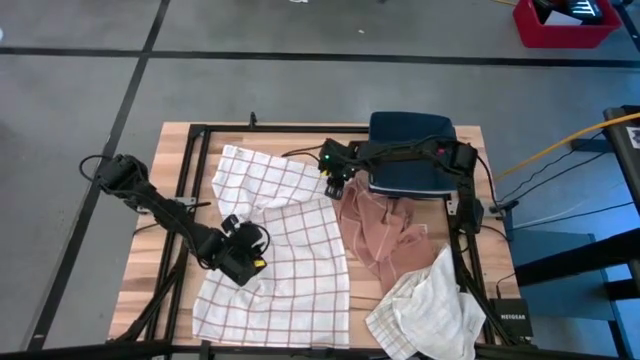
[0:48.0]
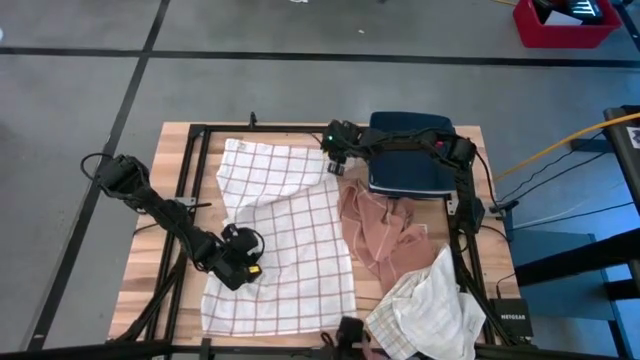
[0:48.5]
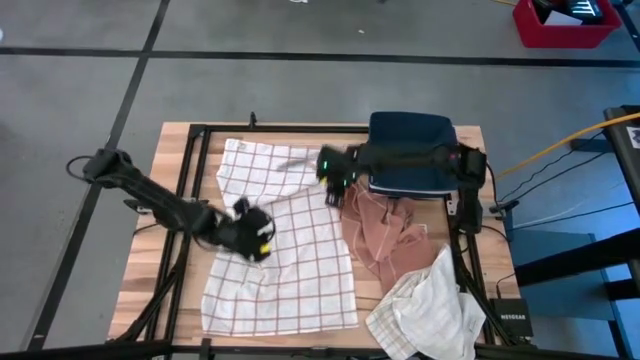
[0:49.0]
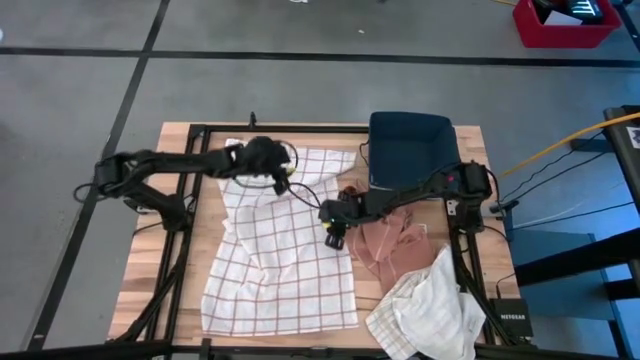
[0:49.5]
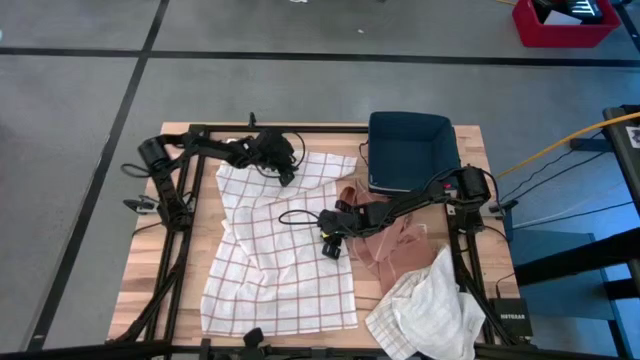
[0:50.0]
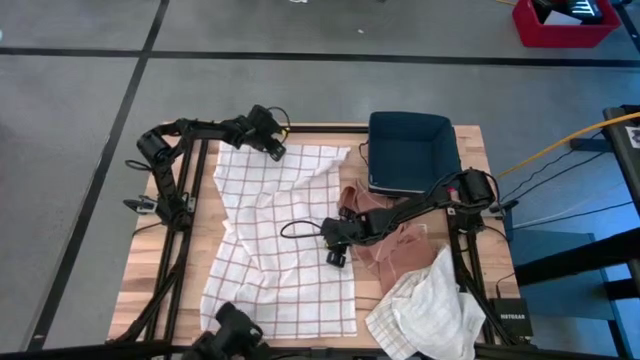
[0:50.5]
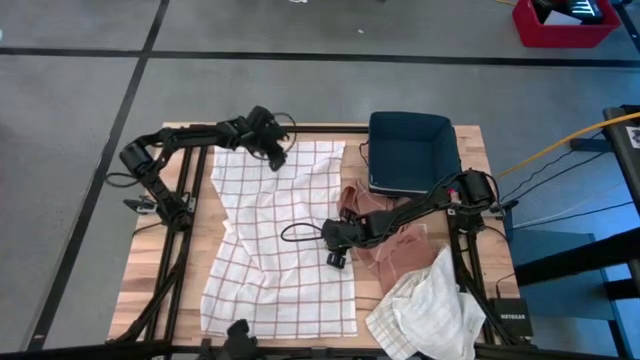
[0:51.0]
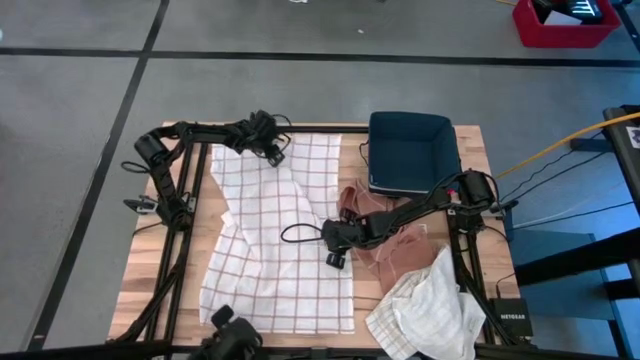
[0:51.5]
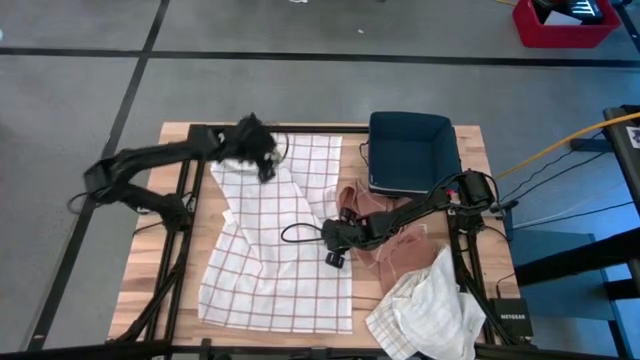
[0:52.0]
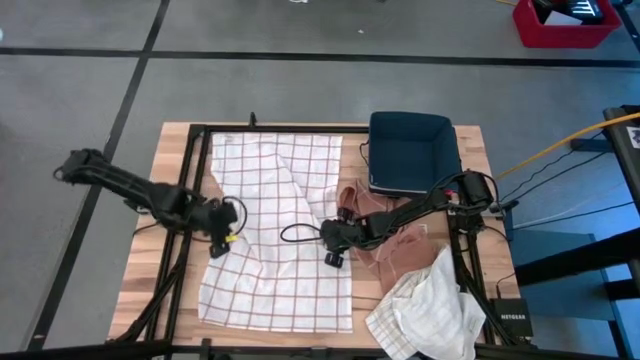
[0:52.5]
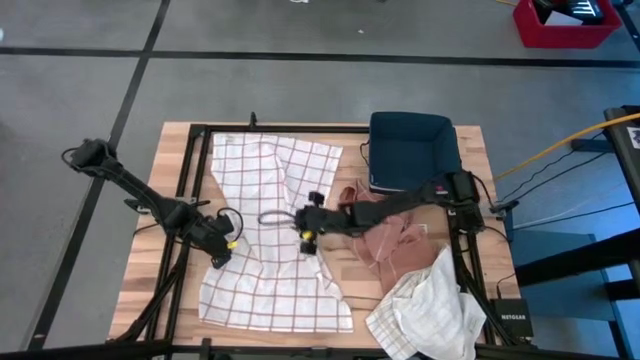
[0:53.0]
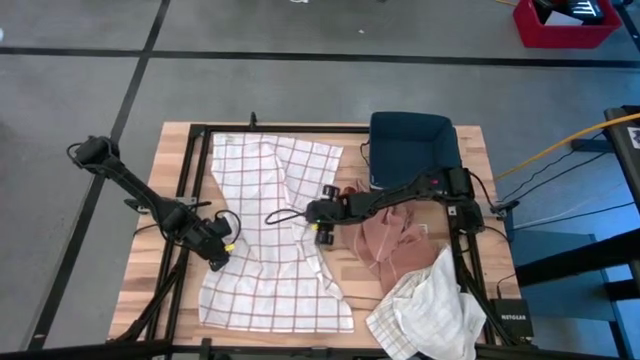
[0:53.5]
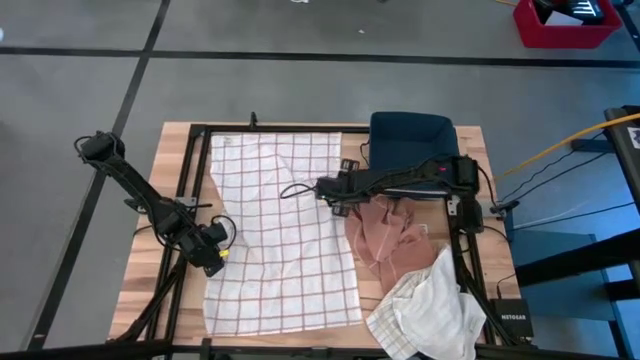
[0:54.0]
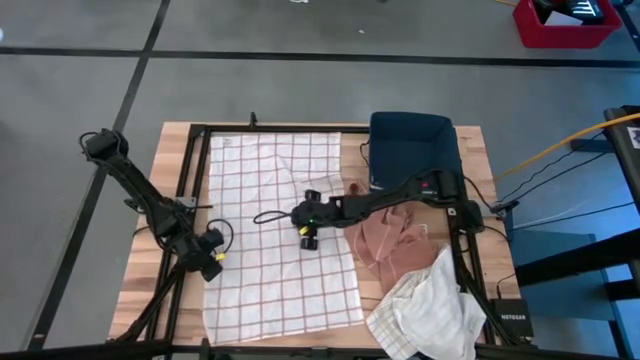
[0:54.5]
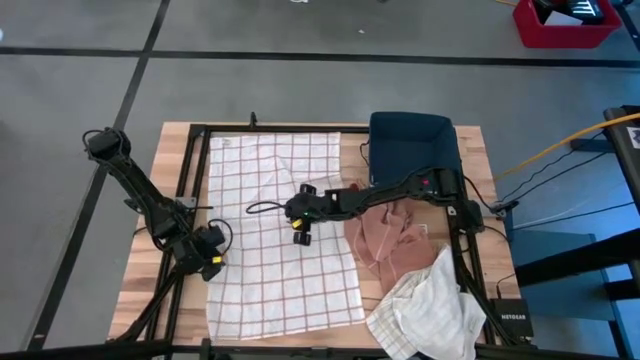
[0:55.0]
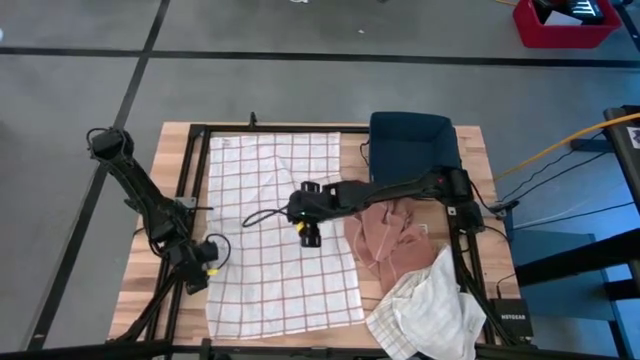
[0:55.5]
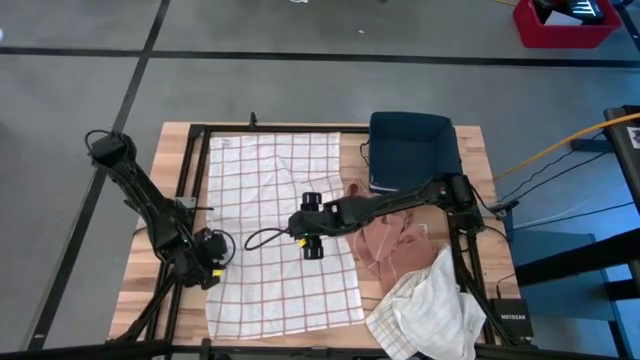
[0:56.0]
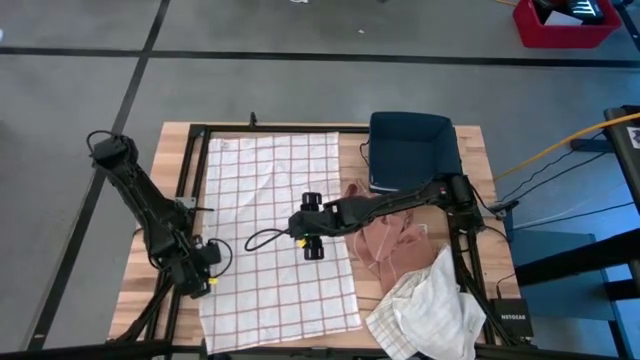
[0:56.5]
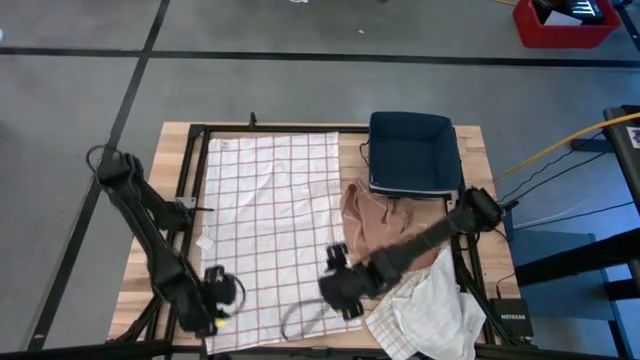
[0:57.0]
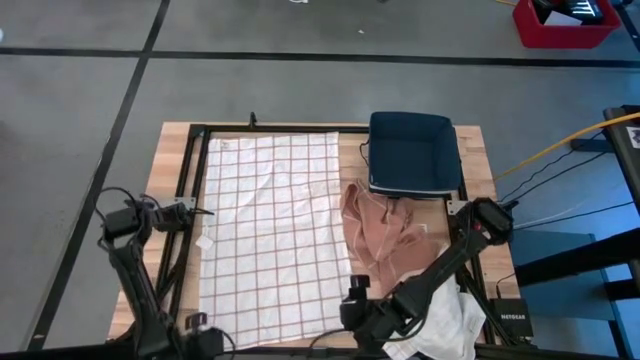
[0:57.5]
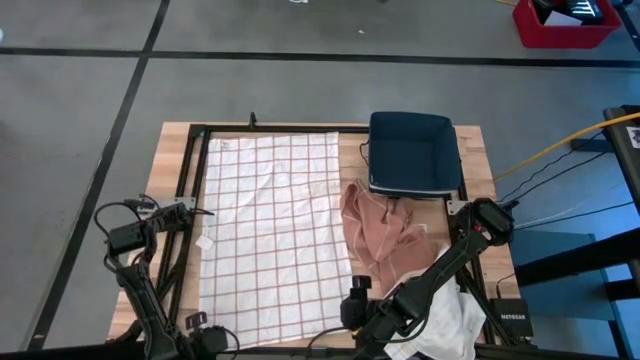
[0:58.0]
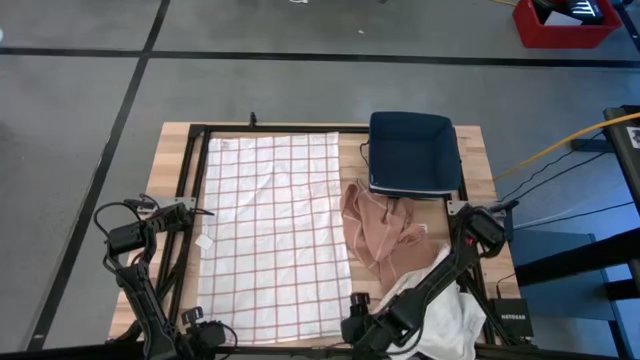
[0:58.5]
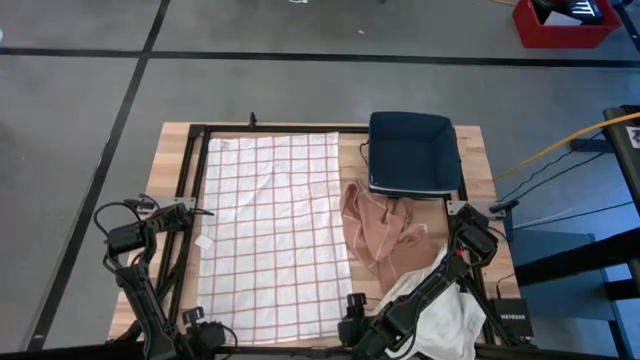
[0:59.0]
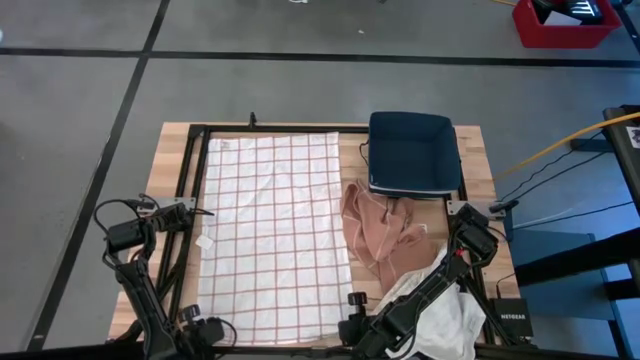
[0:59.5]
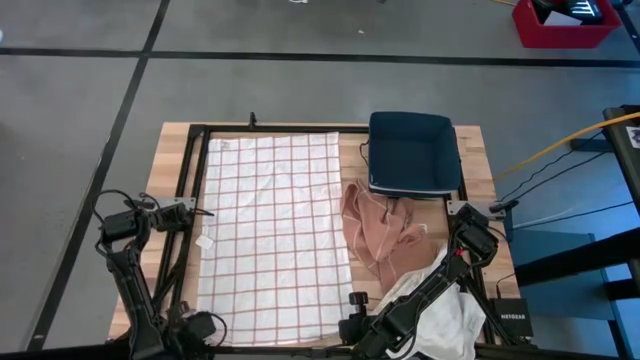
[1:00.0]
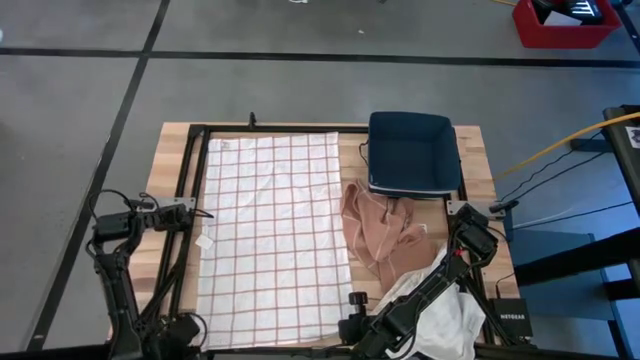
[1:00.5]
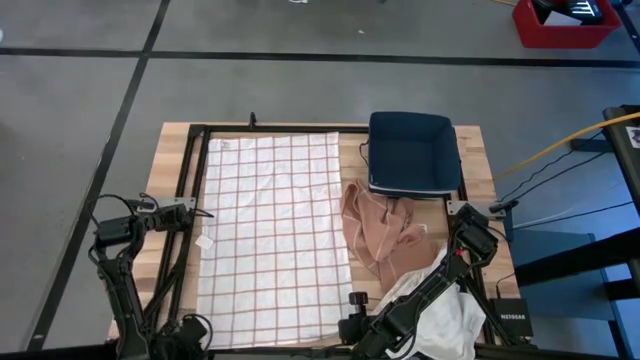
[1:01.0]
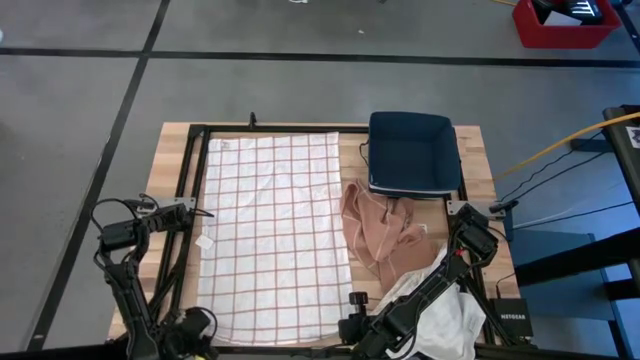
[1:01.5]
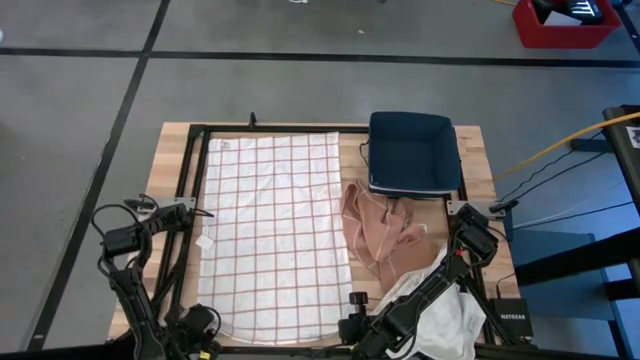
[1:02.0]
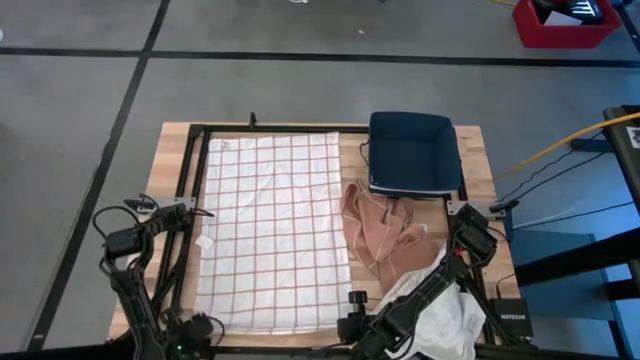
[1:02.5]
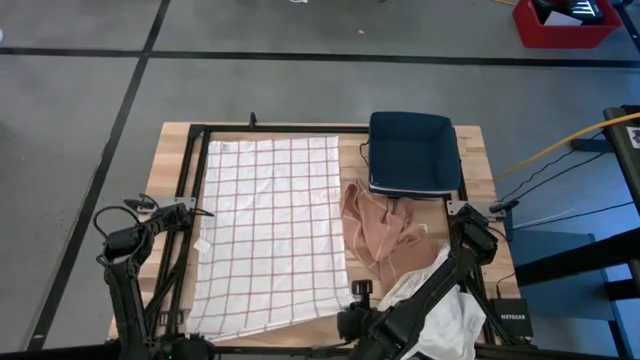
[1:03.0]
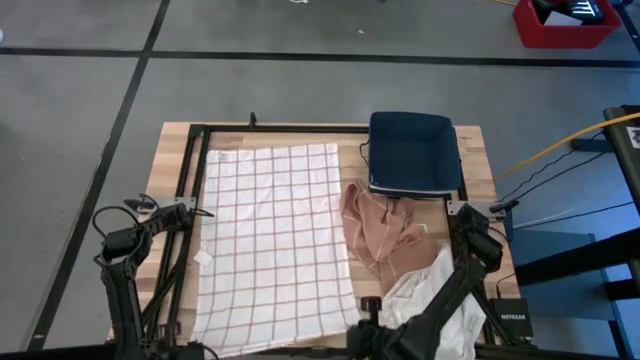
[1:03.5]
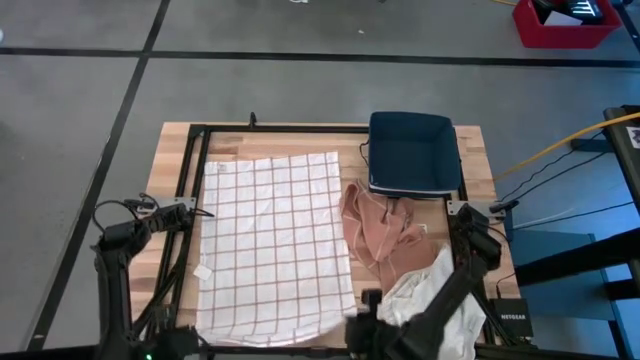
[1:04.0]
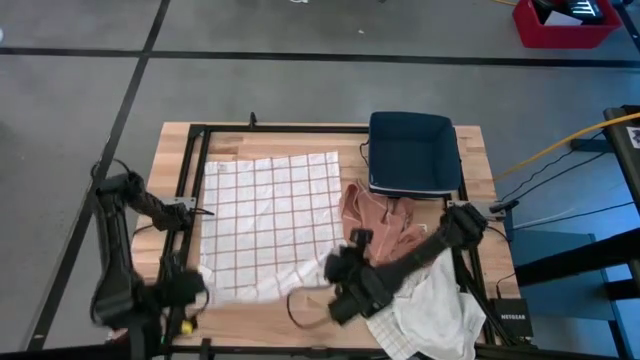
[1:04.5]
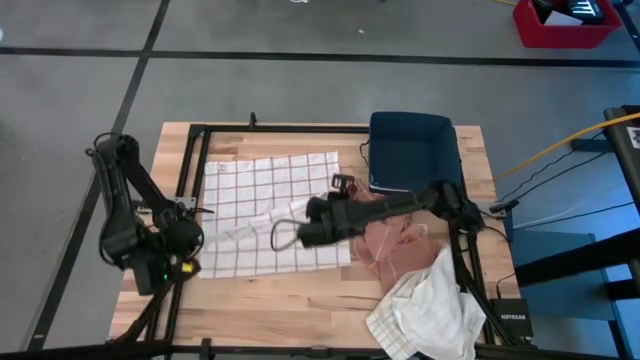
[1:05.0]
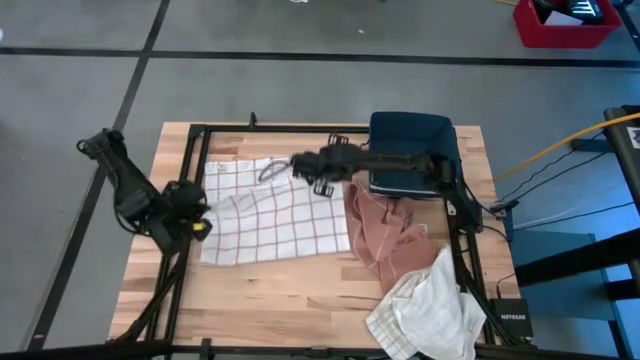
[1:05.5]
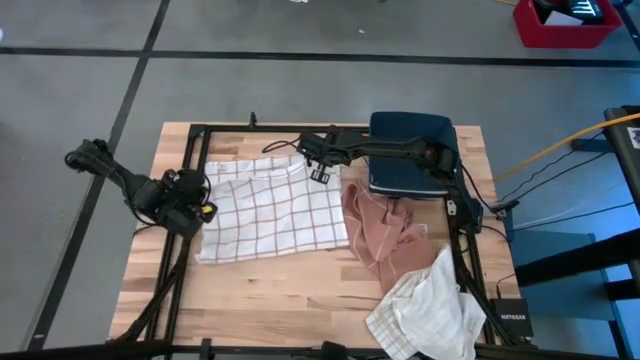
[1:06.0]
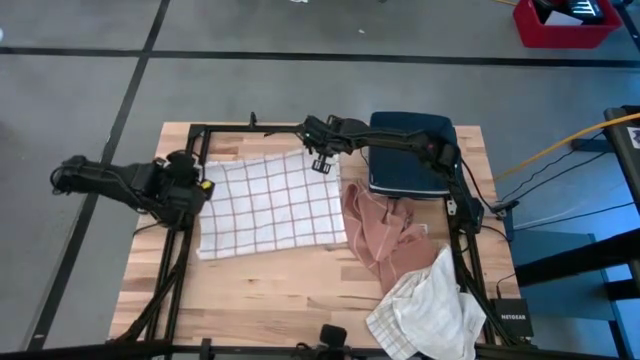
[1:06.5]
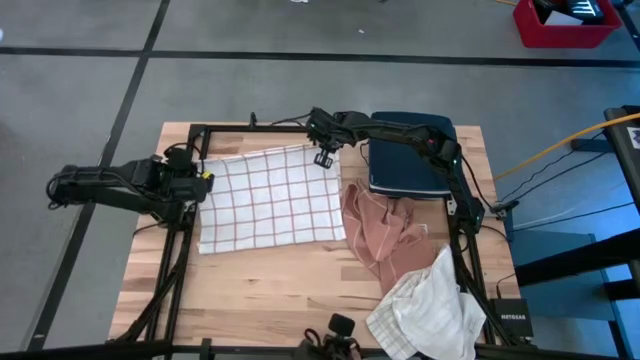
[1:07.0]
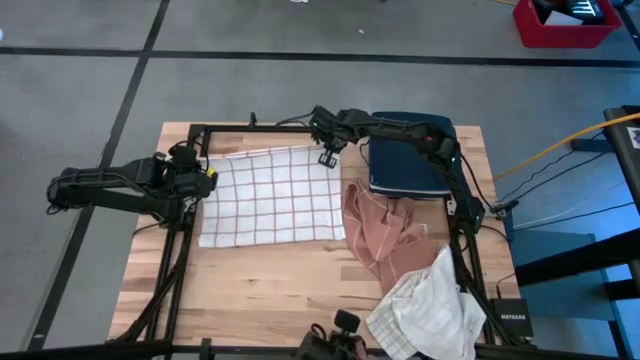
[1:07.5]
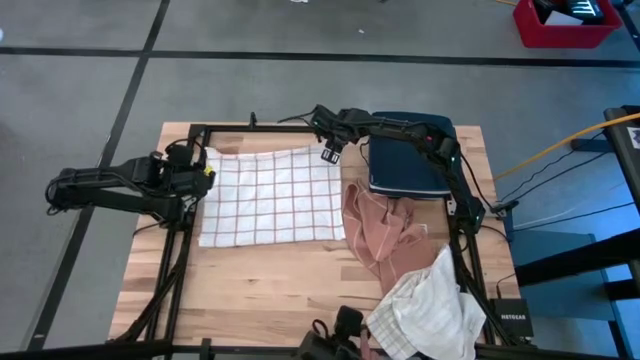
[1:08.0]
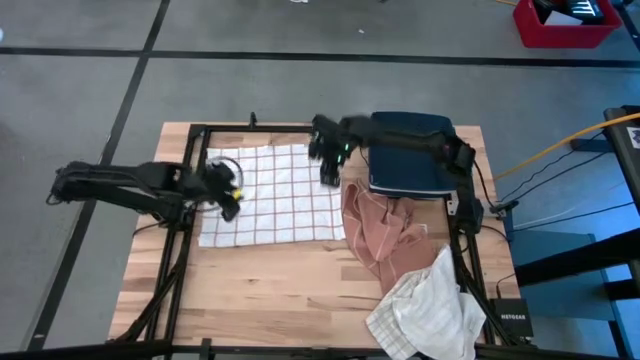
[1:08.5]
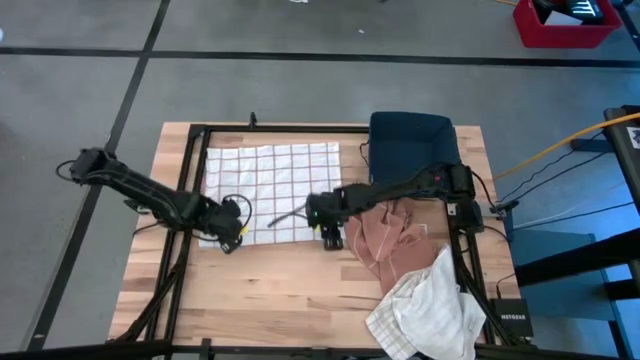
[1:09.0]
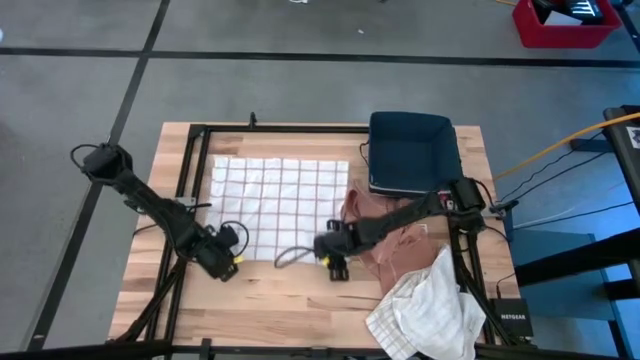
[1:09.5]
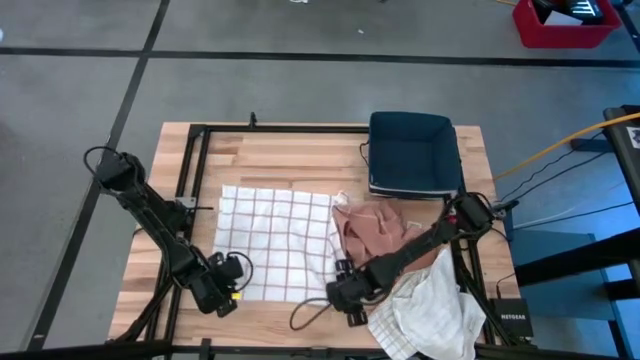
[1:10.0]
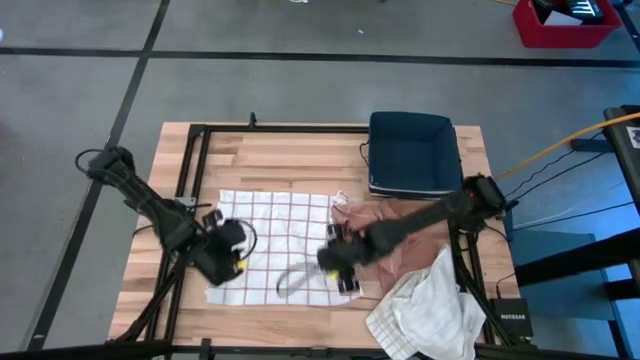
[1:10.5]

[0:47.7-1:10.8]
Task: Fold towel
Fold the brown striped towel on the table
